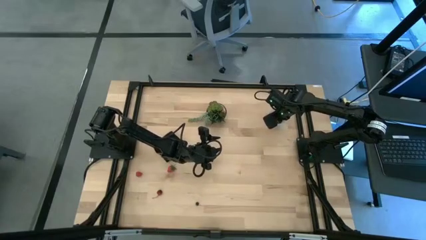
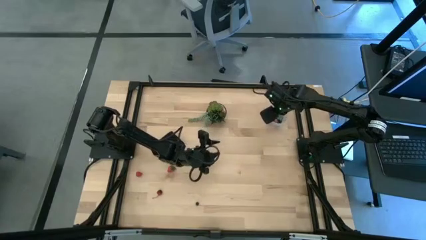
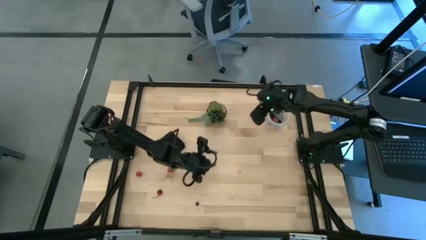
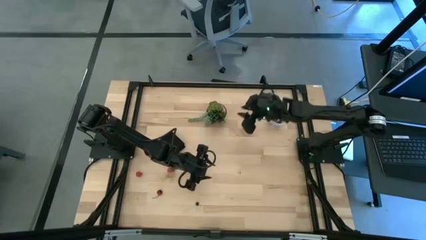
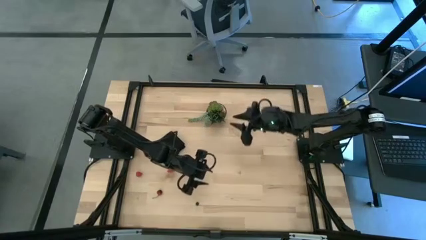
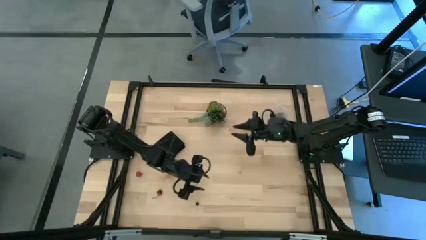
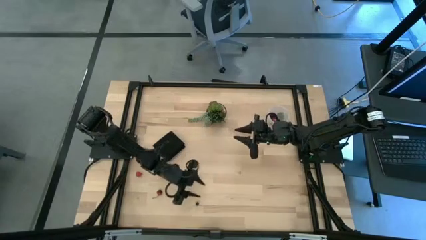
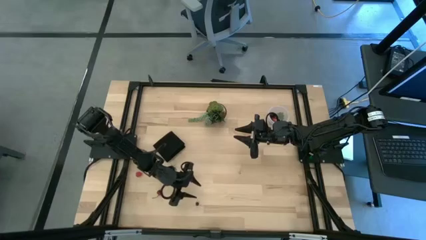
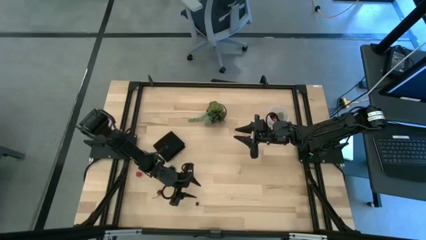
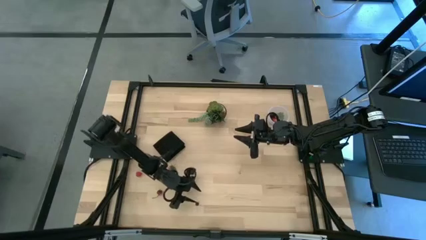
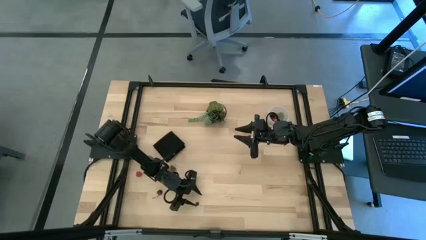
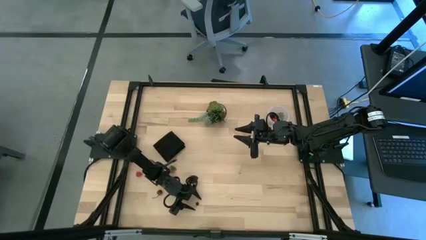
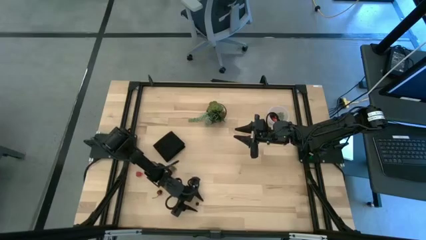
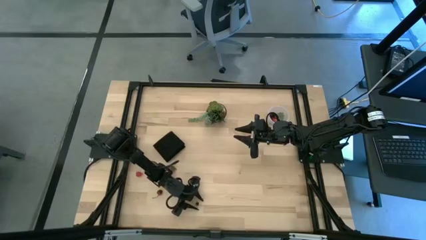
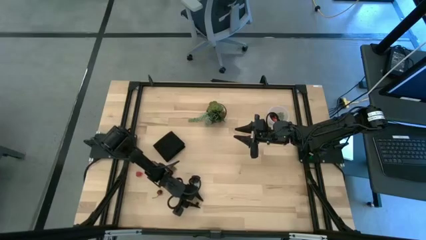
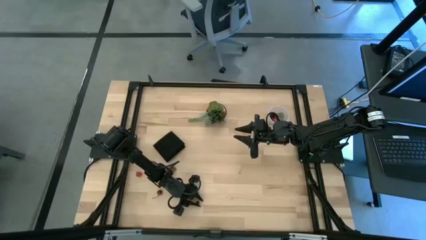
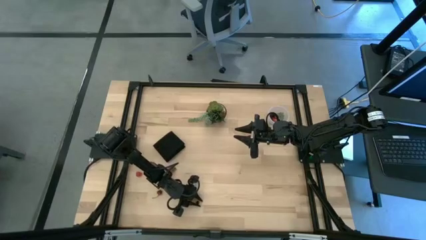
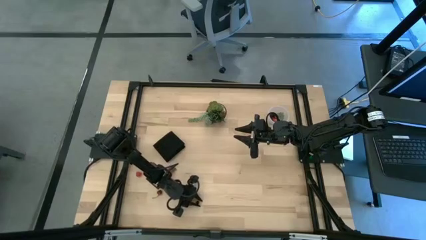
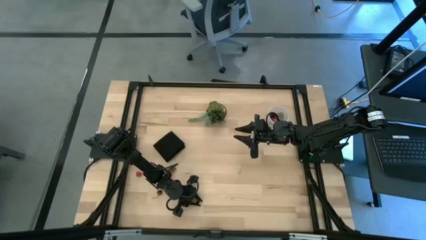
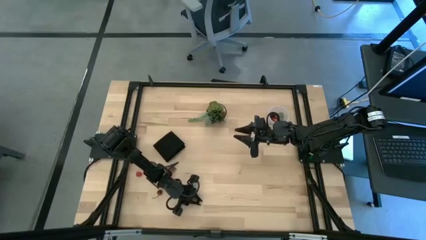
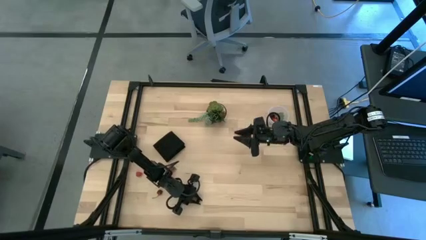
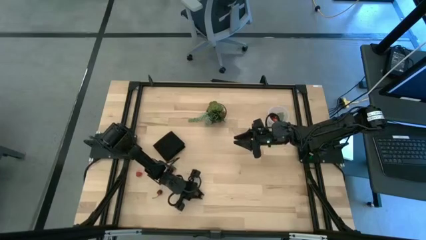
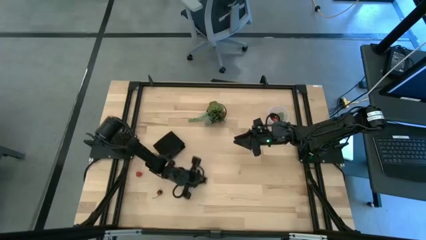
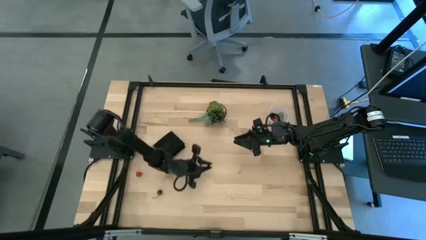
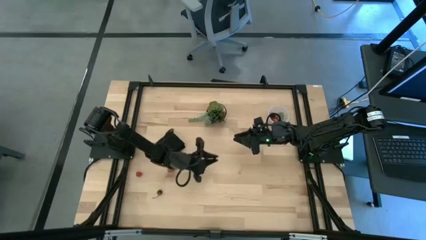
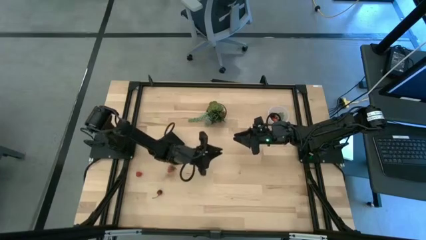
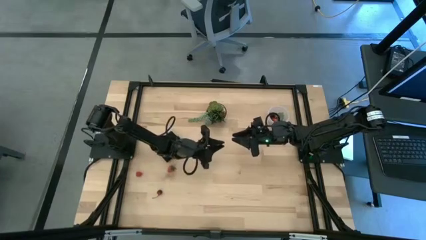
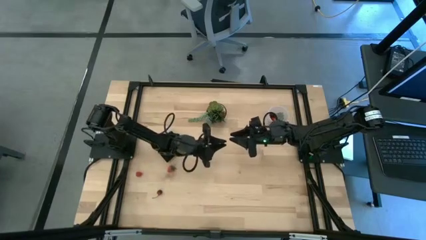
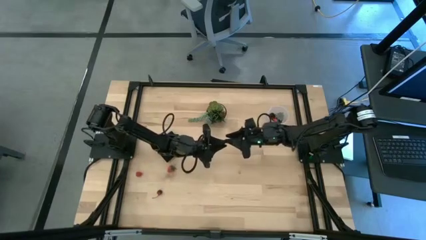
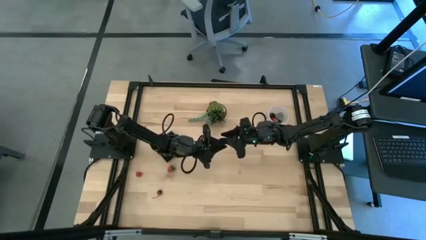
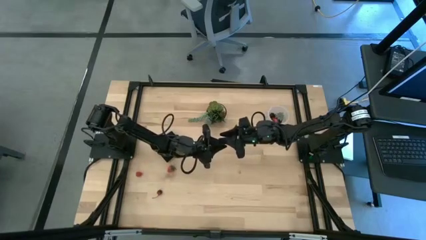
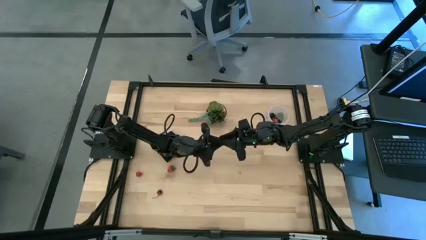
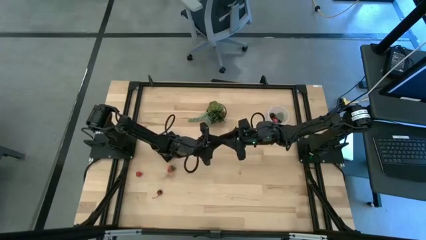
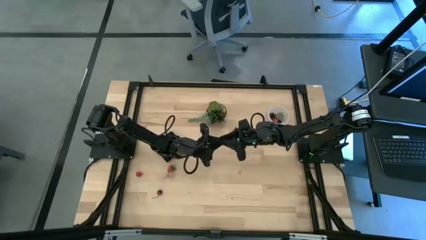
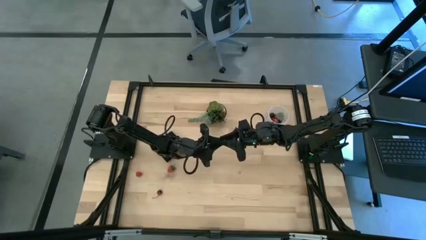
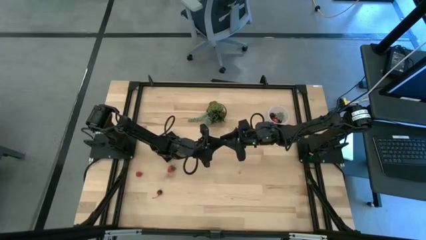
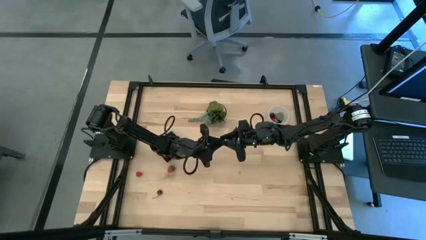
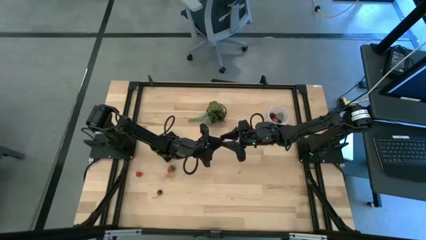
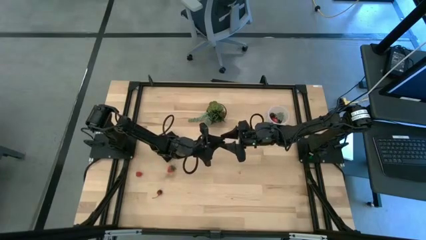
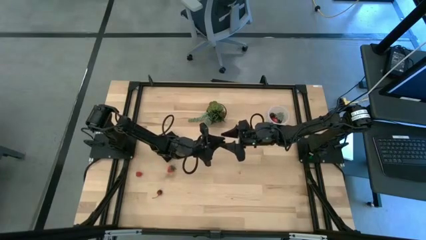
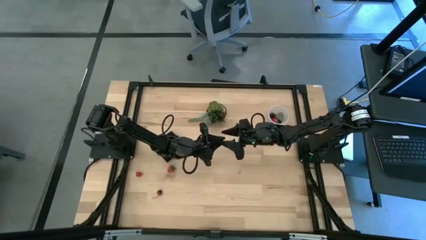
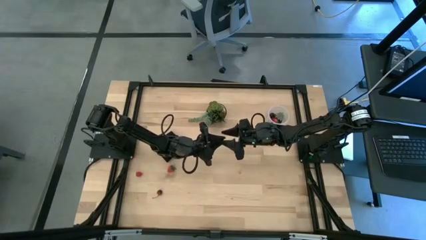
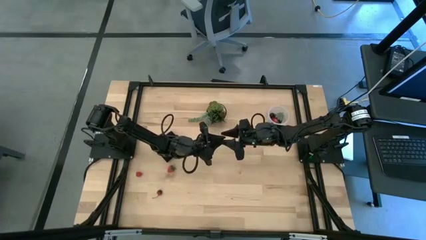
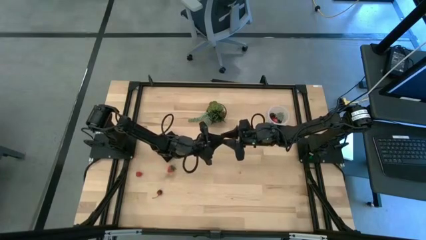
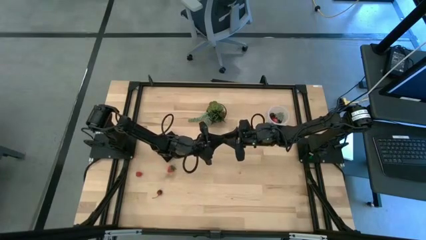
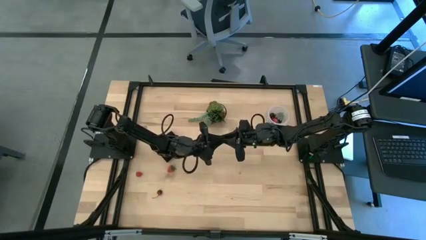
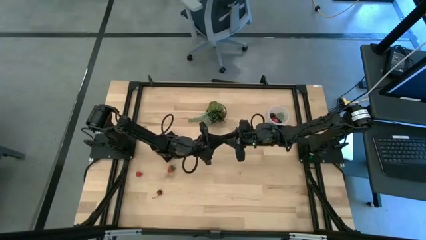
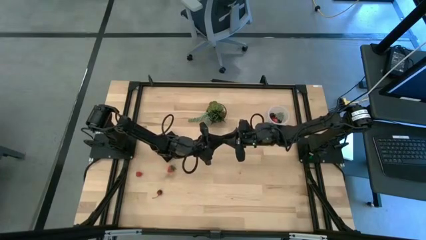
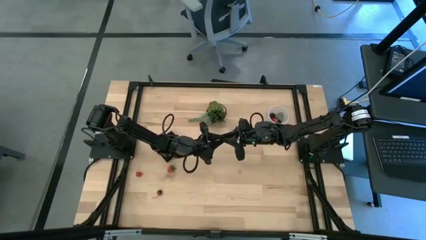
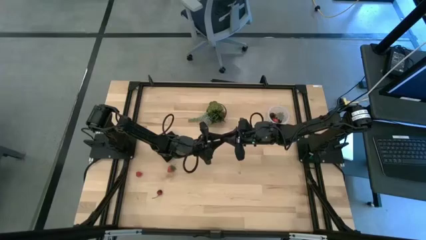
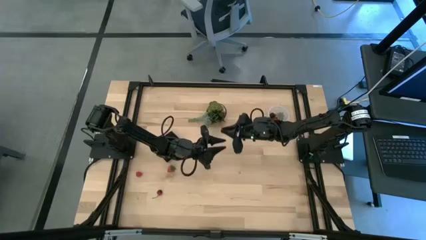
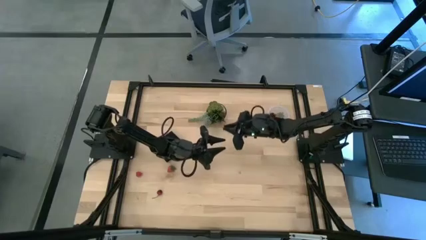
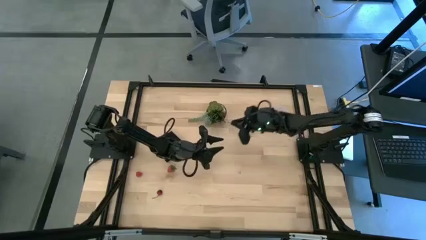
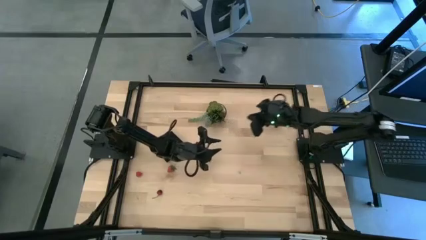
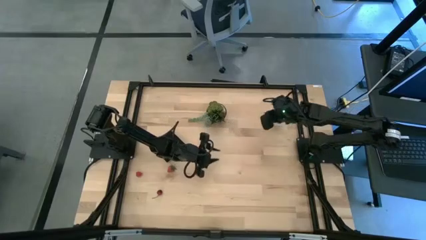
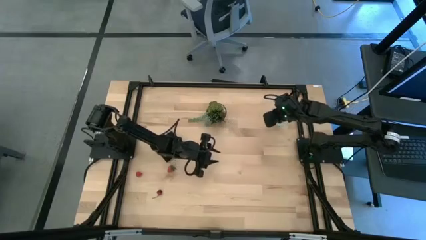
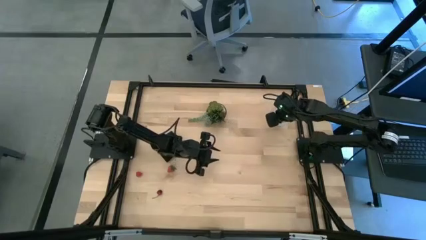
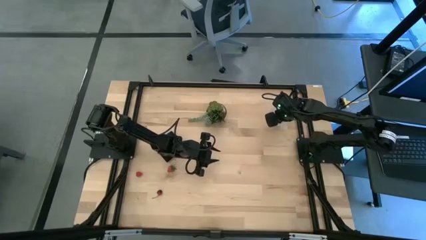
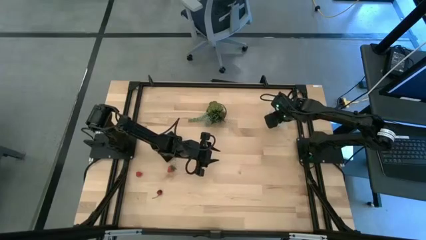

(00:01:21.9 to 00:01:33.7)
Task: Pick and placing Produce into tupperware
Put the blueberry into the bin

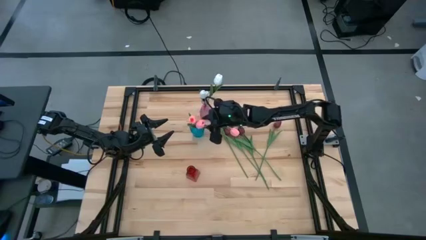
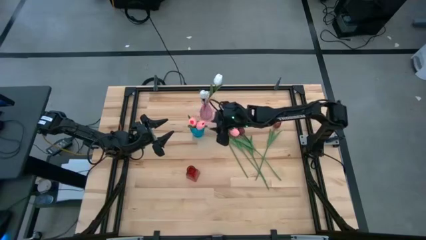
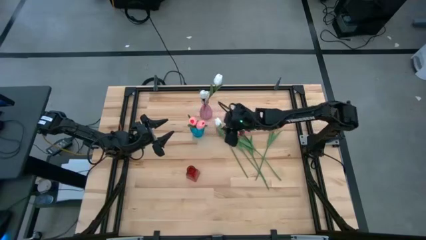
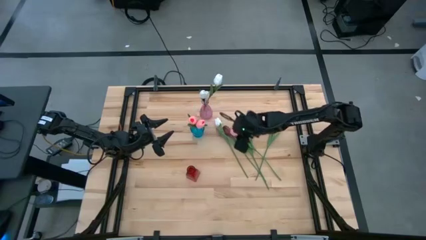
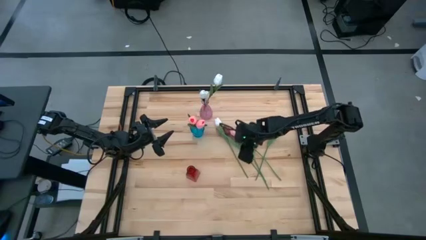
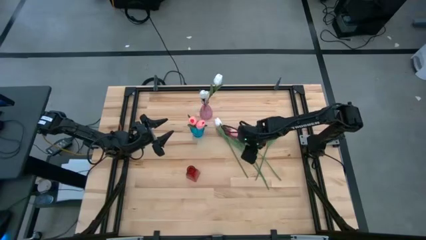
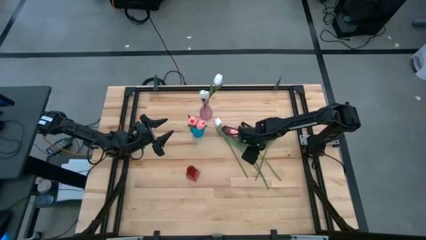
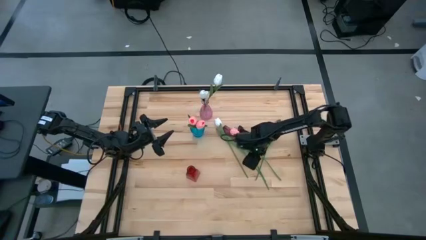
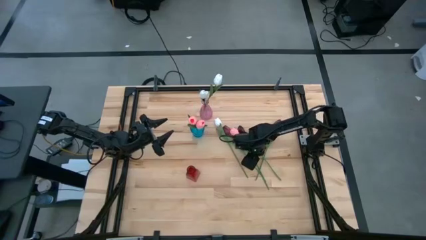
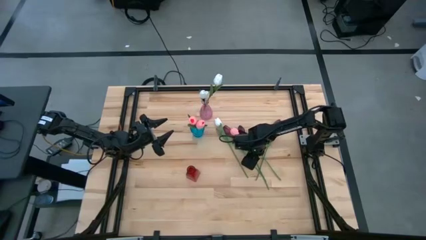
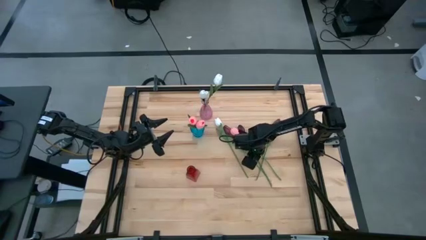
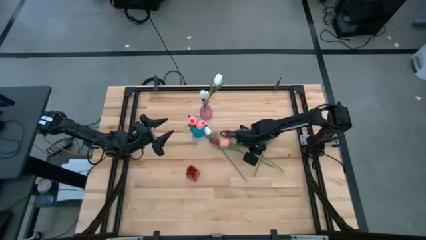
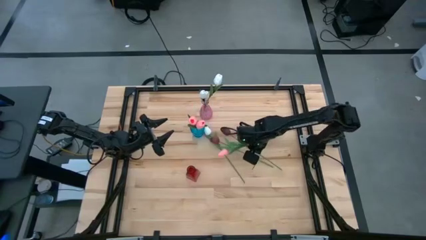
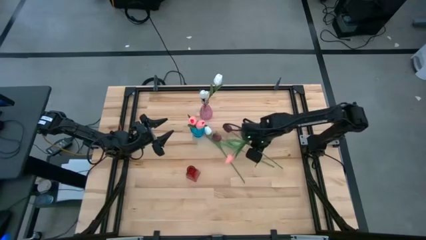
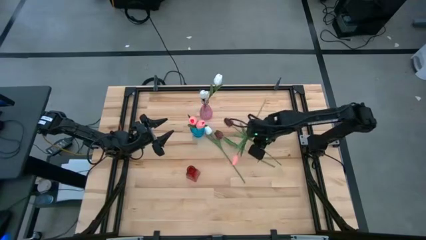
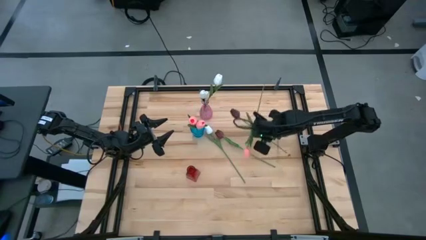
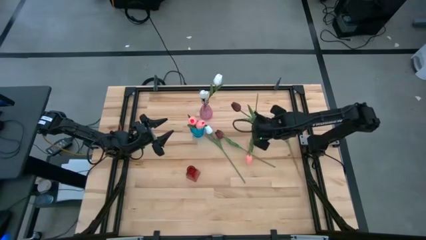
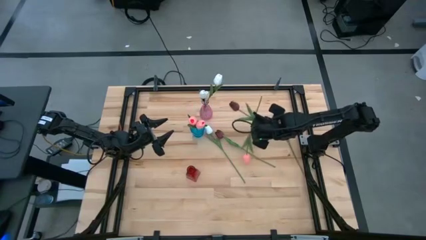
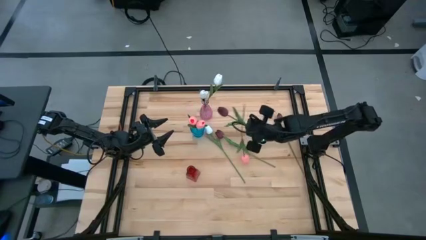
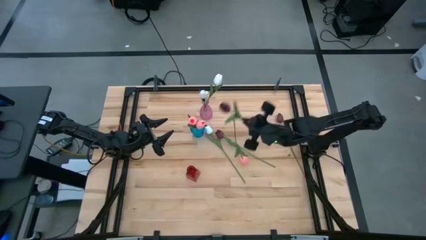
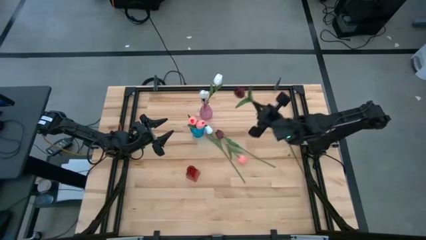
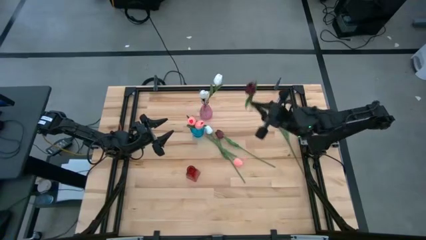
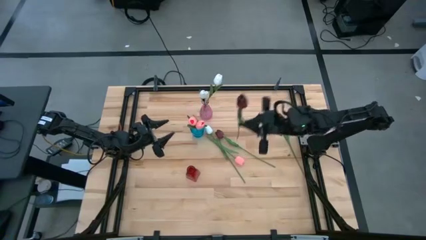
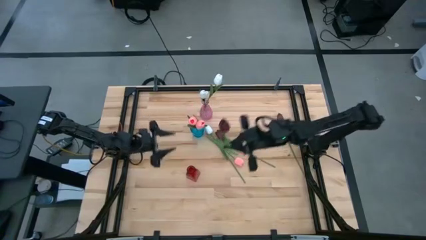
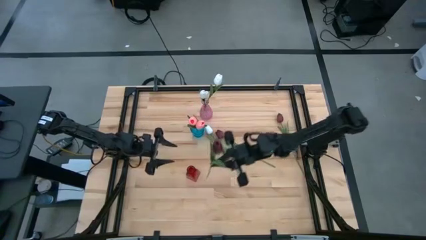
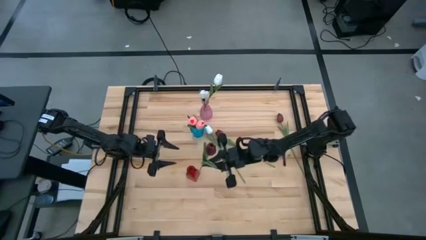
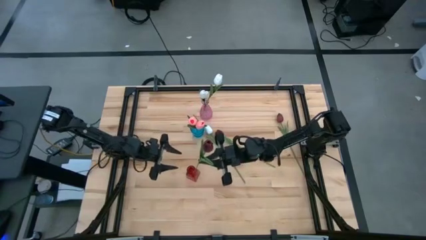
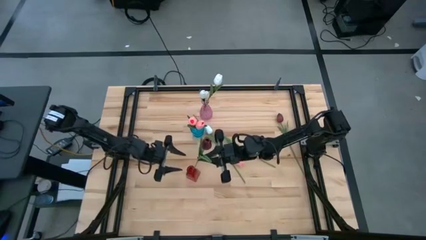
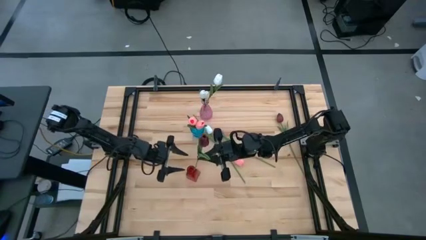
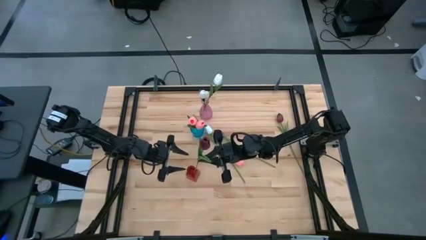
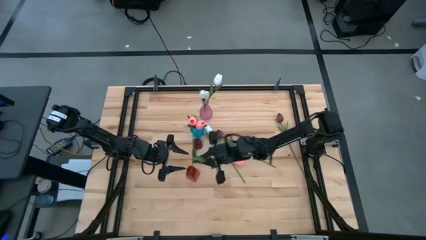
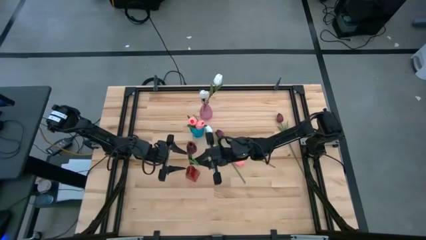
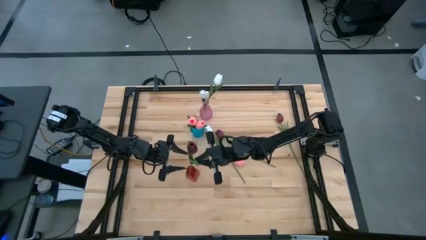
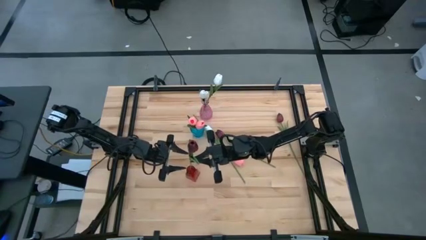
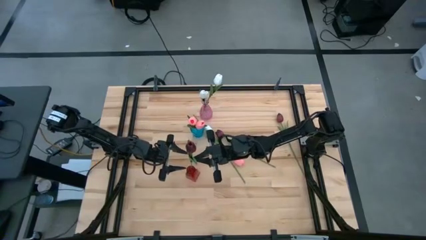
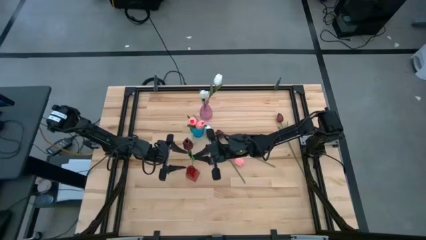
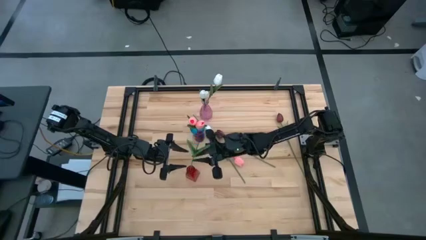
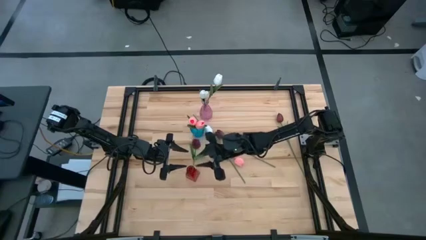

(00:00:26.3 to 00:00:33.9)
Task: Sort flowers into vase by color
Put the middle red flower into the red vase
